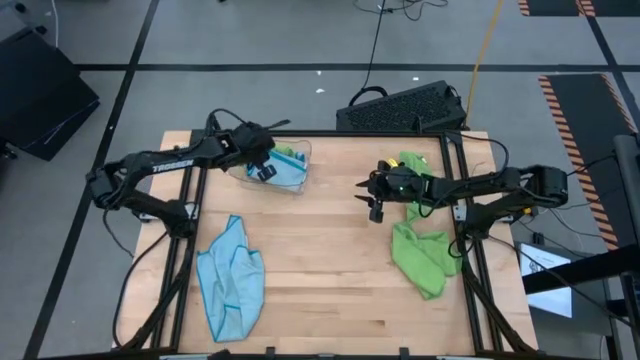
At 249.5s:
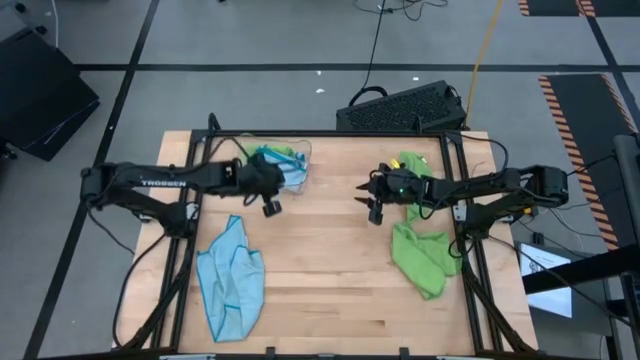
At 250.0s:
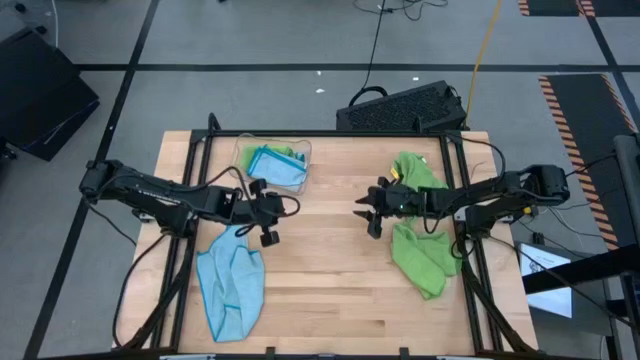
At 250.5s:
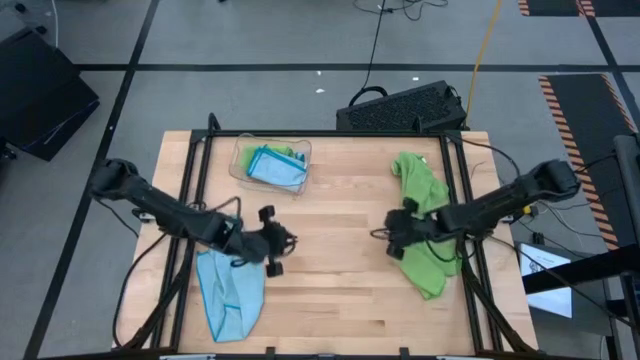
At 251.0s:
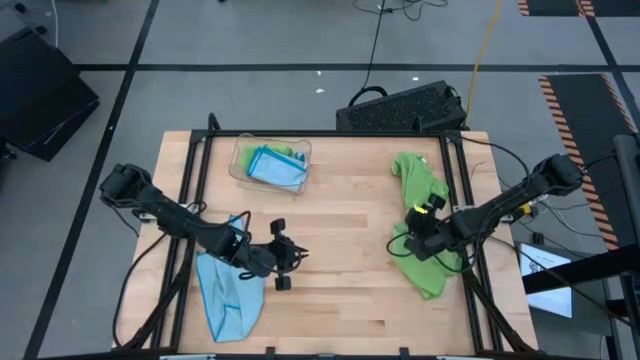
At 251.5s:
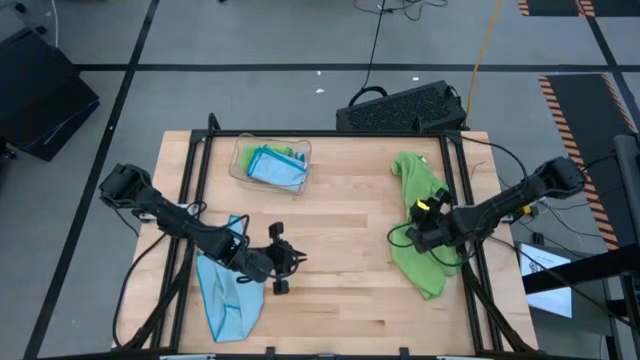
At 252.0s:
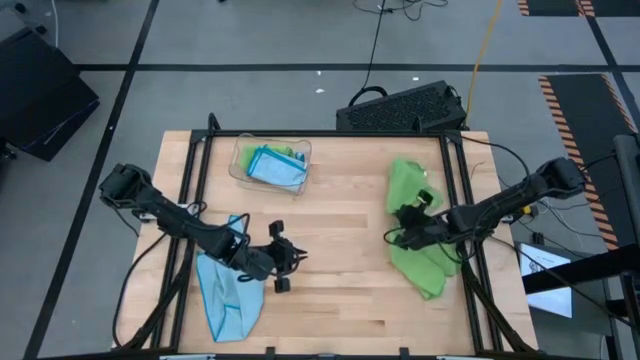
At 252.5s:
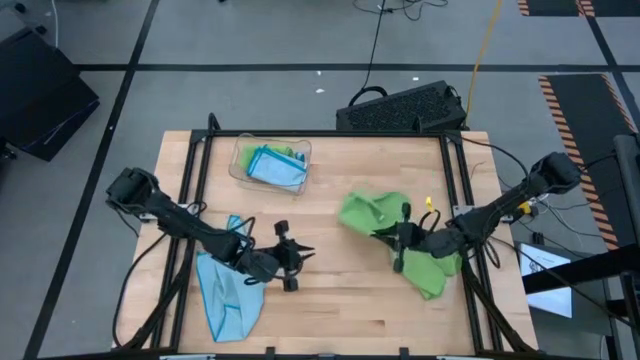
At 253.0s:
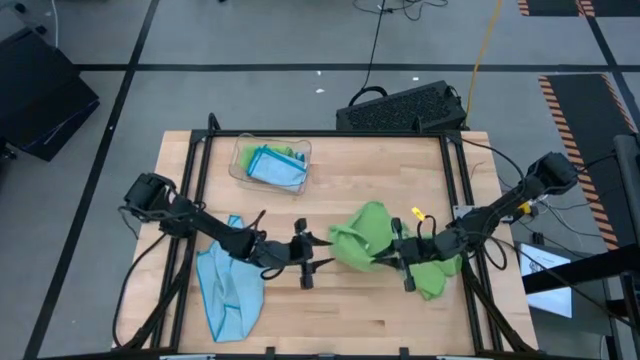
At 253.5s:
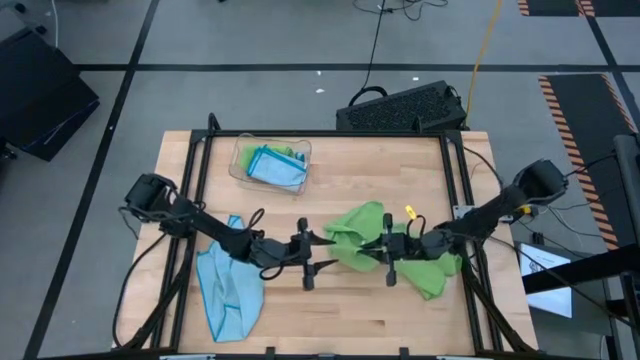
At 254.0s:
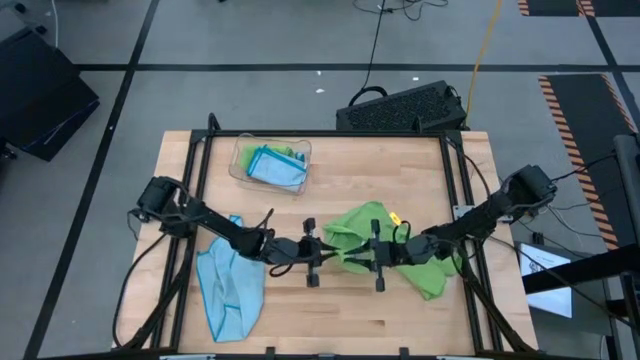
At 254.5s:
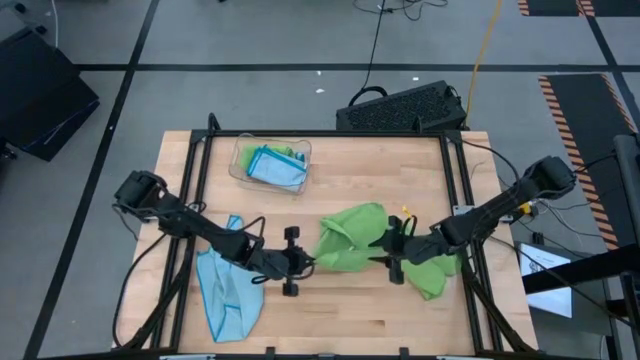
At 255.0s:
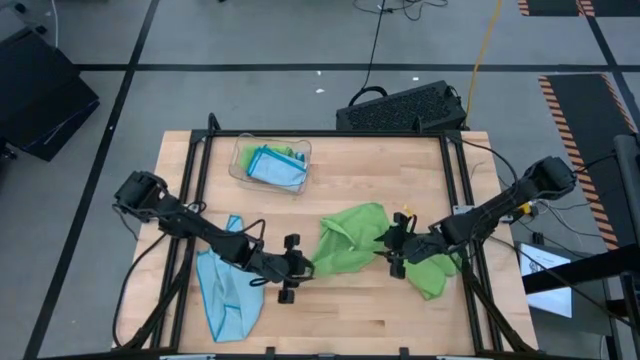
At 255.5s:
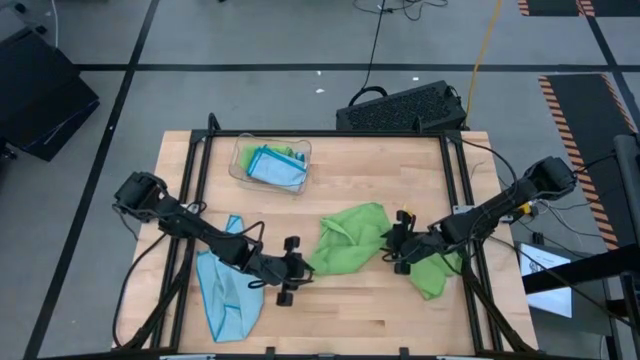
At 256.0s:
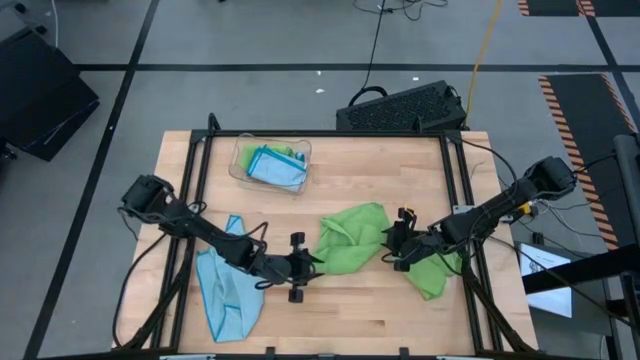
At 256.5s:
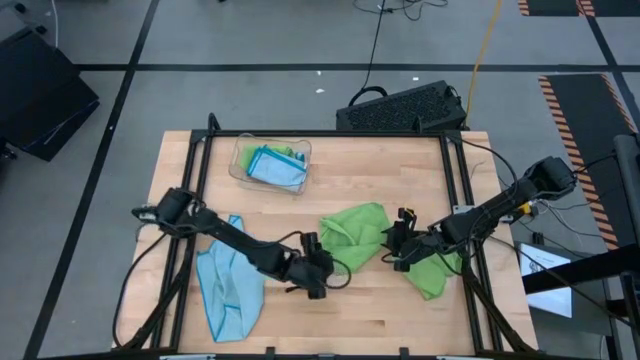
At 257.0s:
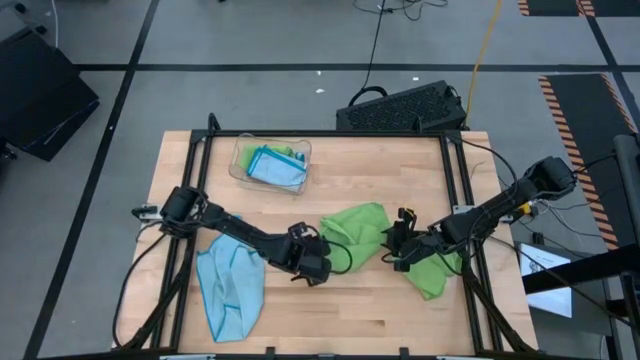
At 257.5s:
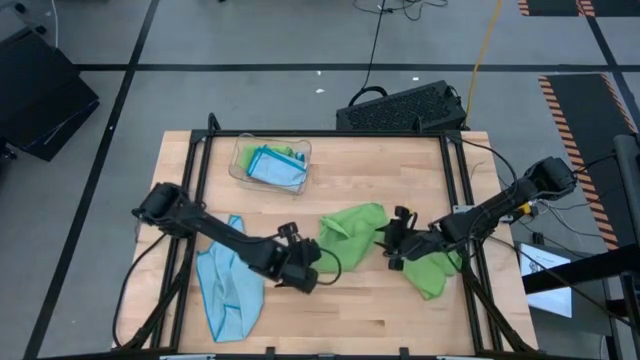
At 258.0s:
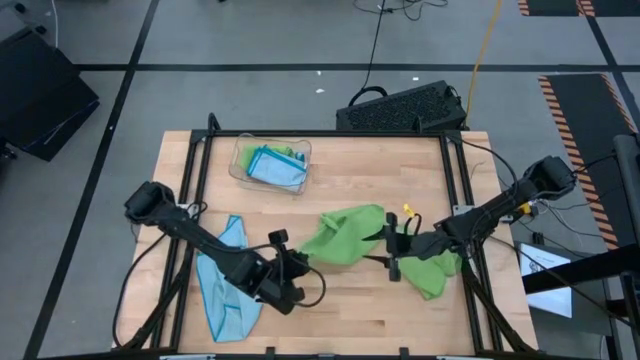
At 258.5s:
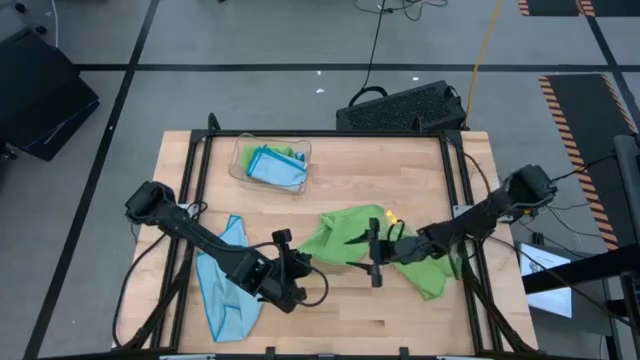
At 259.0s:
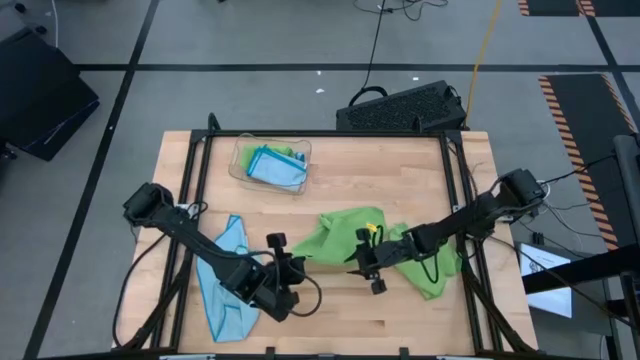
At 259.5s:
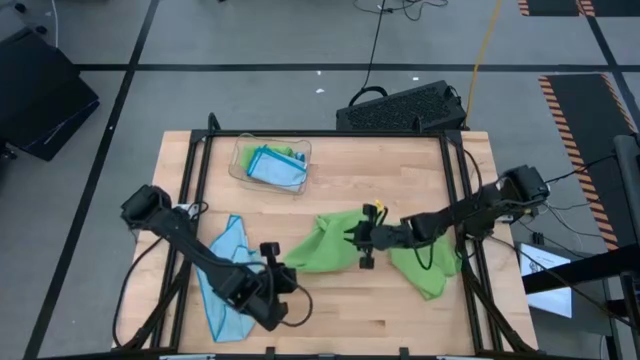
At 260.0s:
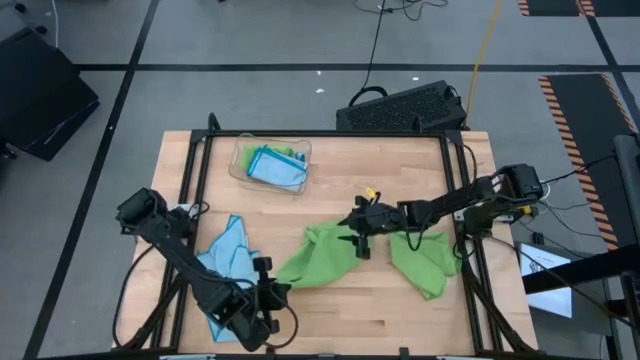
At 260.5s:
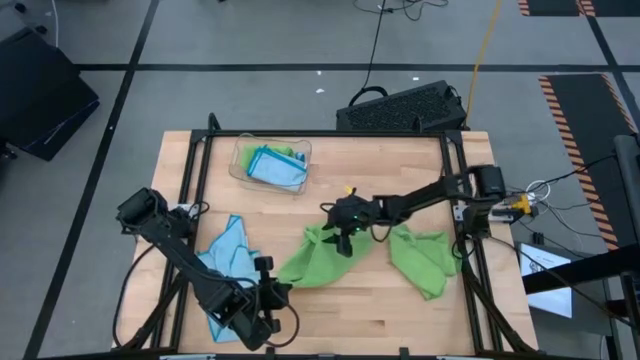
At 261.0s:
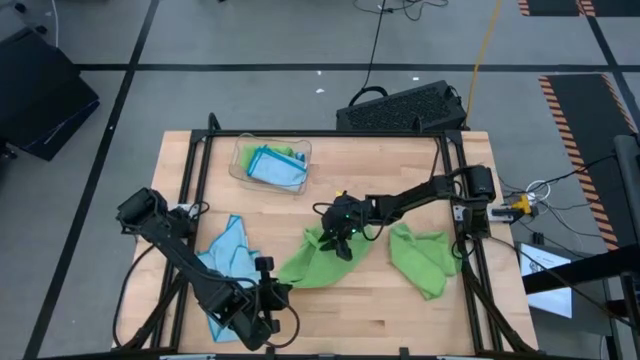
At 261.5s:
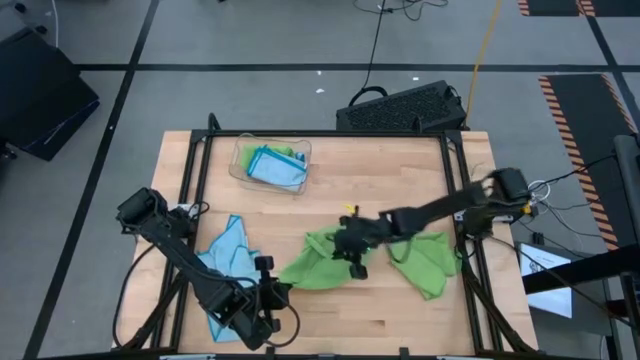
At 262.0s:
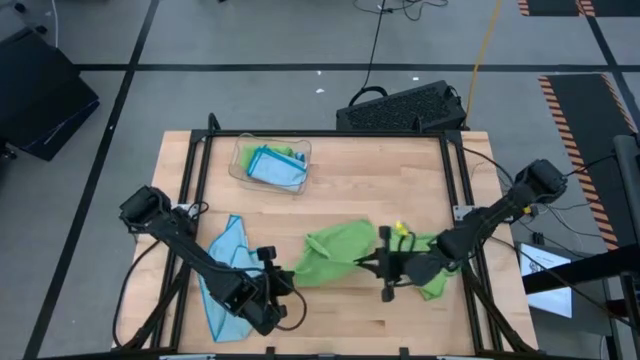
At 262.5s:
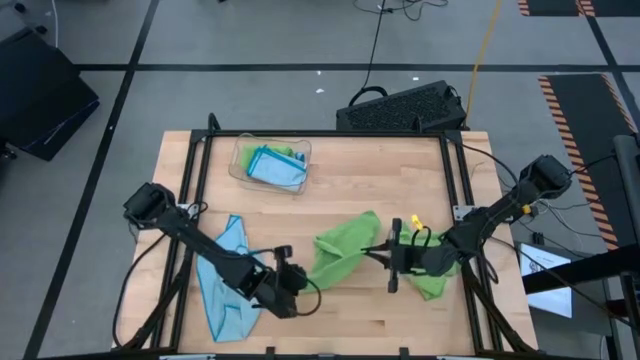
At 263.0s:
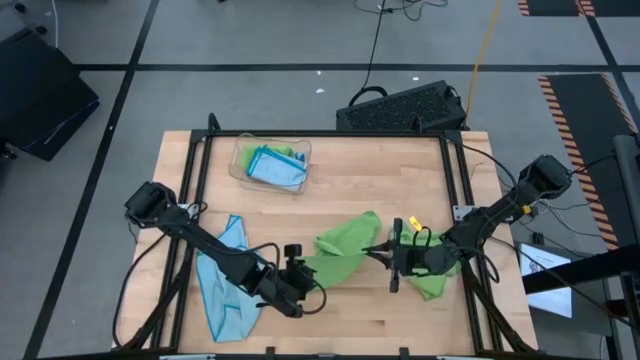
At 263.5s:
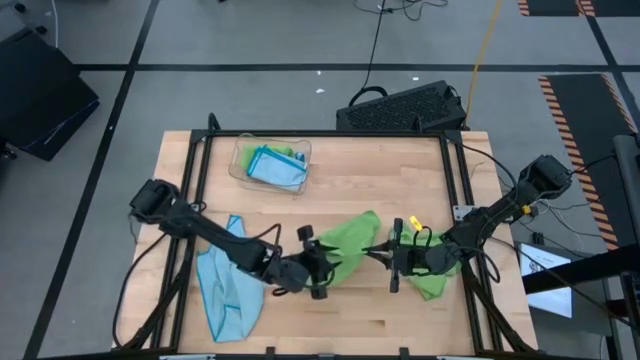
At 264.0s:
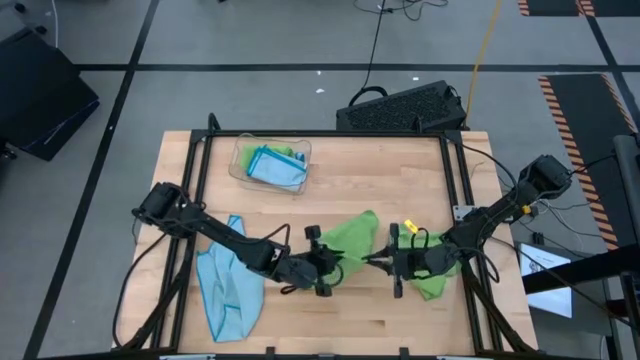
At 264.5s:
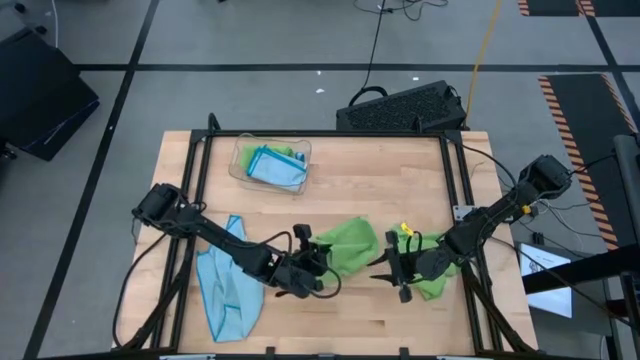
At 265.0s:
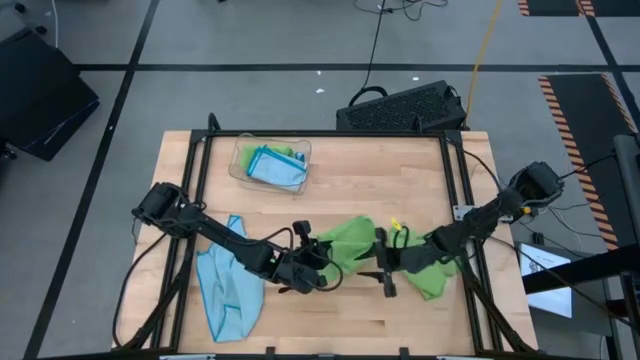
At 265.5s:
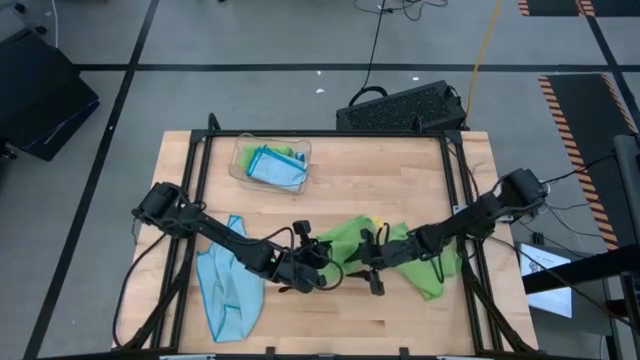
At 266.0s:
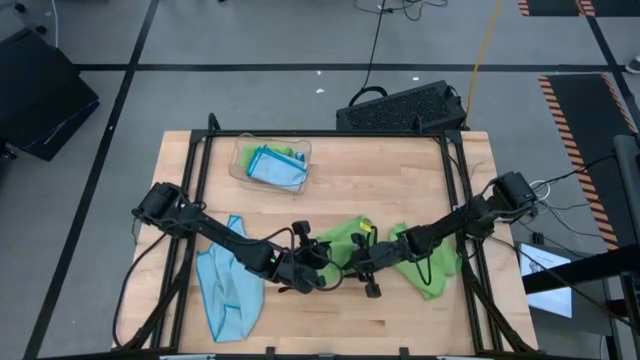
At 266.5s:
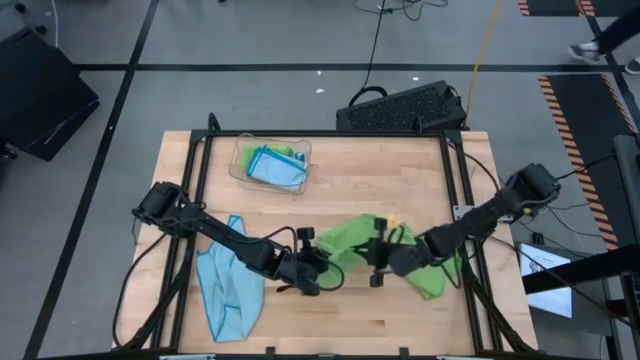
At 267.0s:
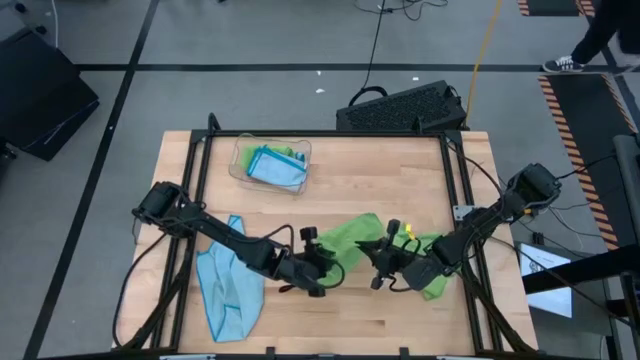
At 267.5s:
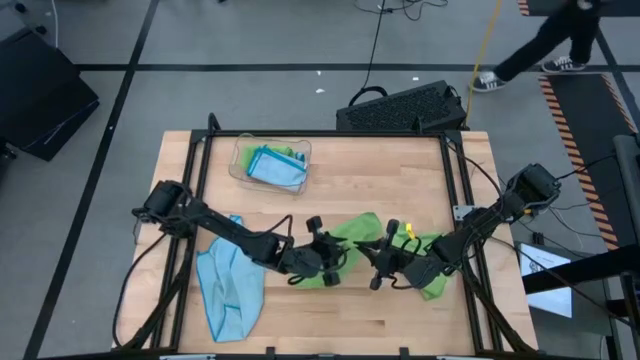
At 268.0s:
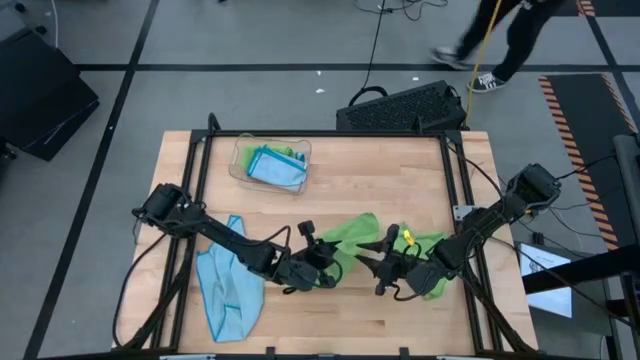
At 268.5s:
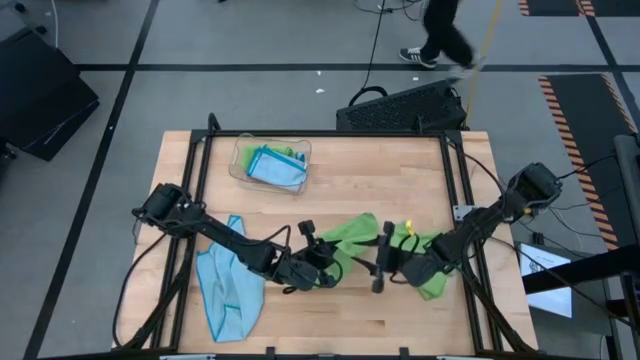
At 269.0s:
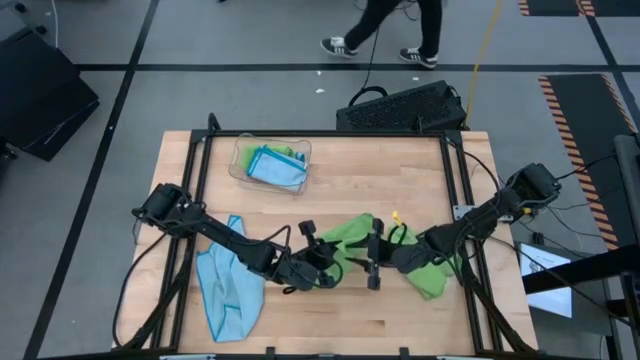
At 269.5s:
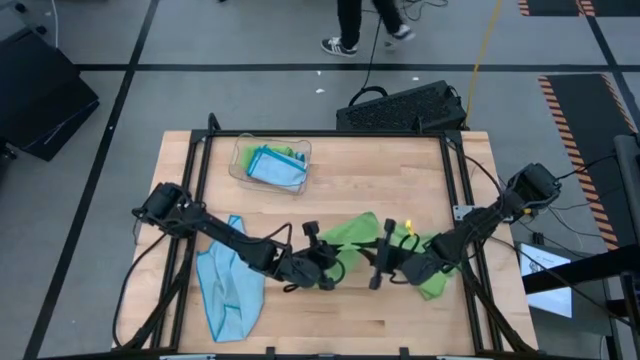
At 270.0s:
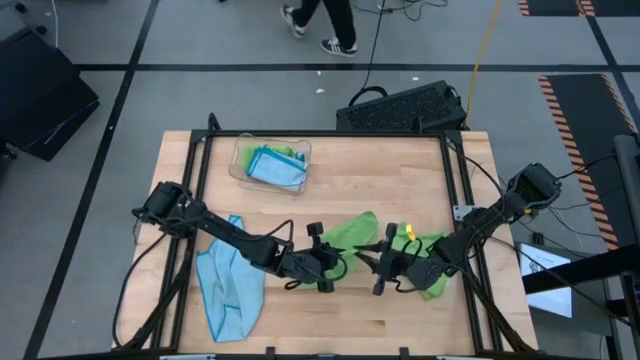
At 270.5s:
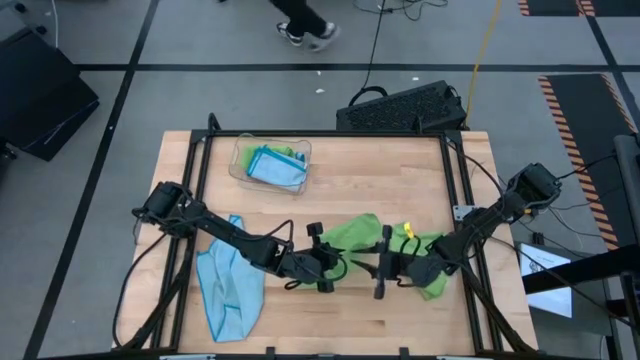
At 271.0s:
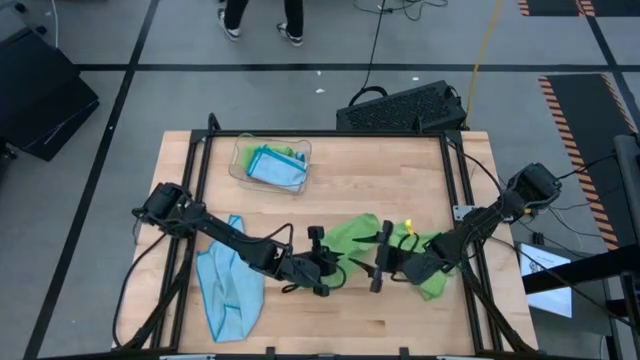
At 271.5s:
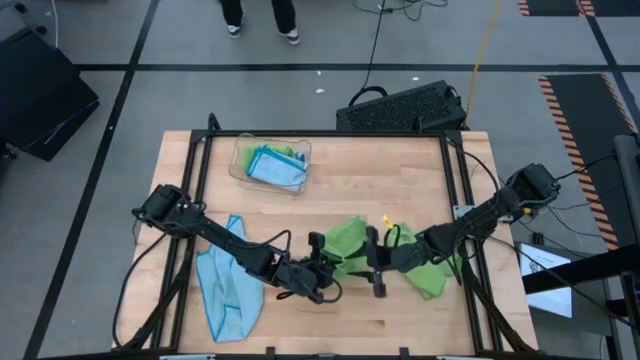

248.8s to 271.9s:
Task: Fold microfiber towels
Fold the top green microfiber cloth
